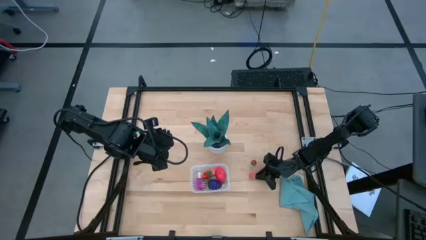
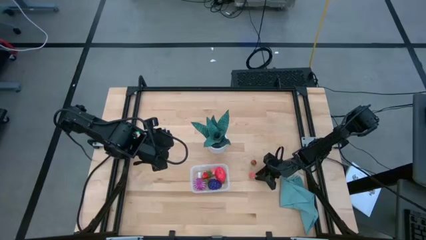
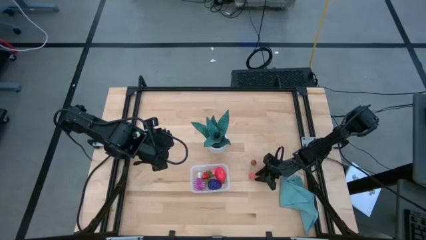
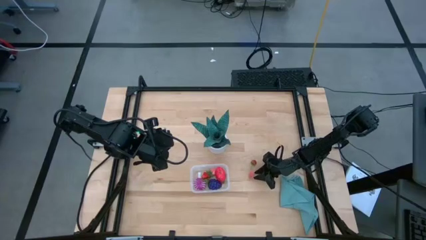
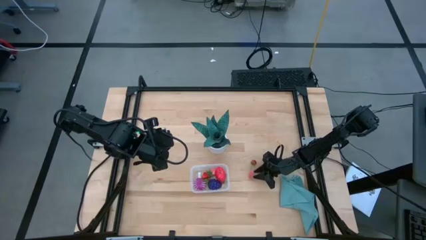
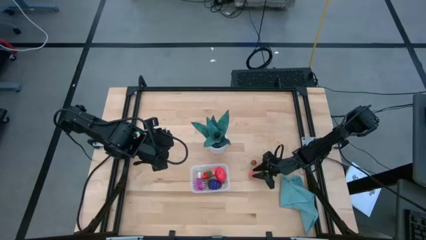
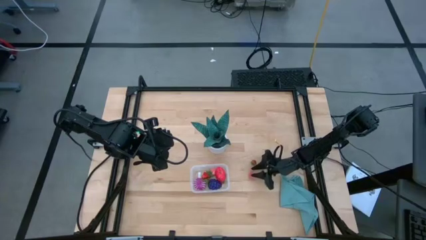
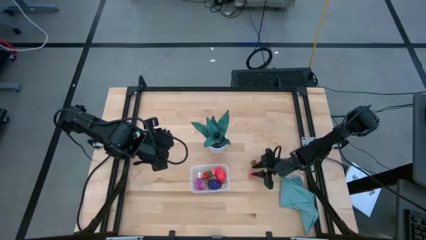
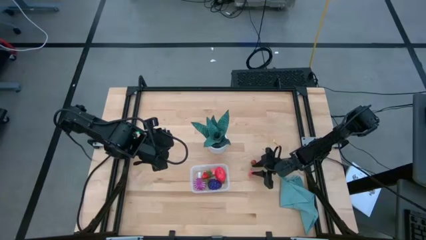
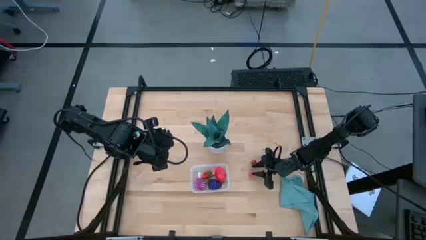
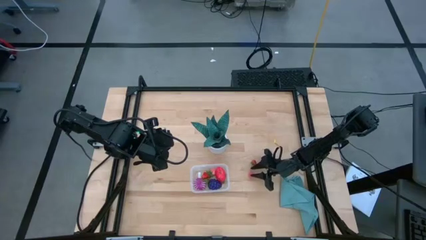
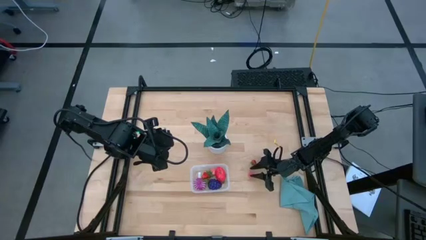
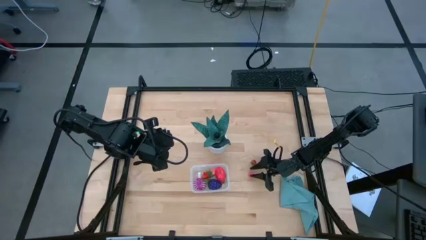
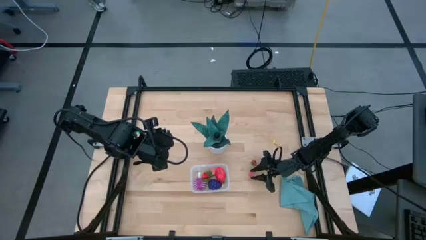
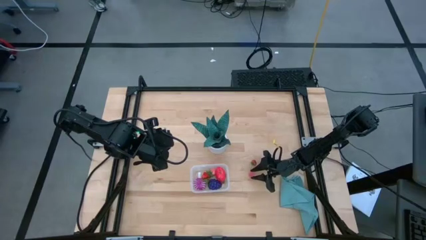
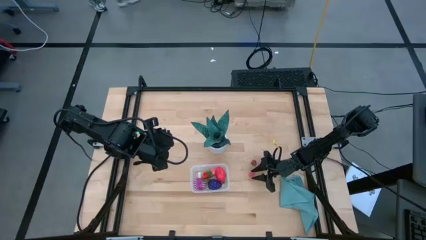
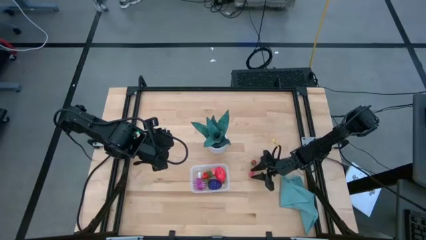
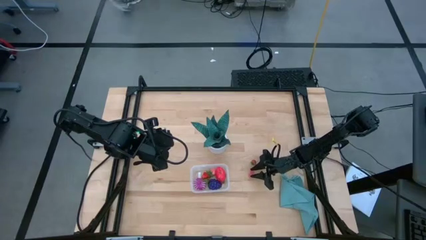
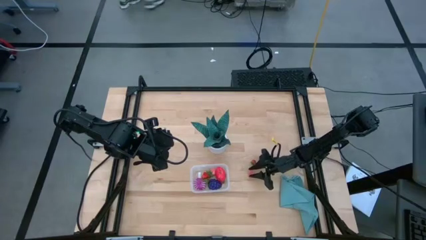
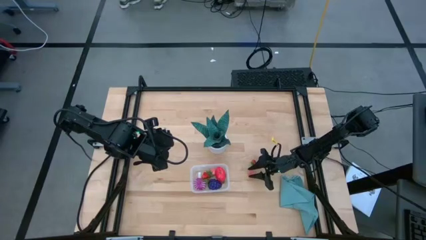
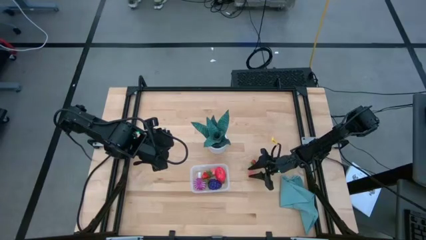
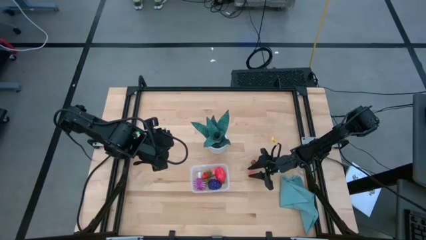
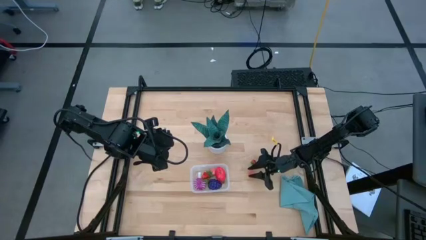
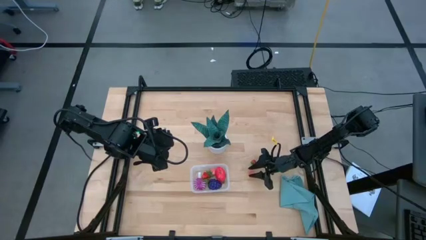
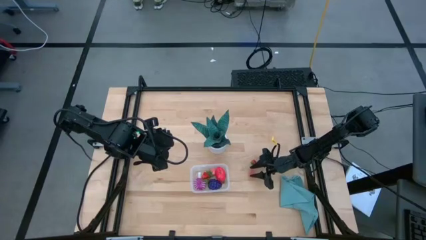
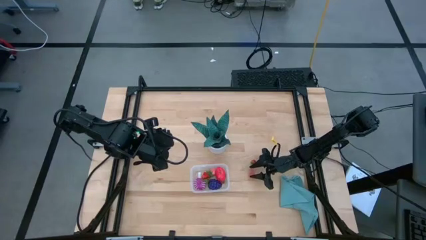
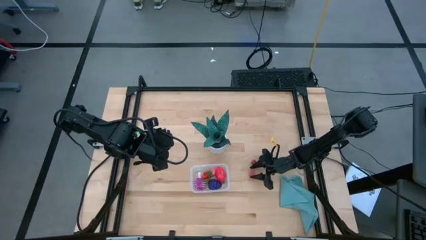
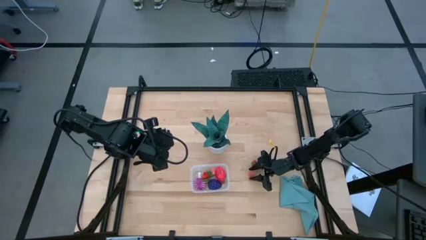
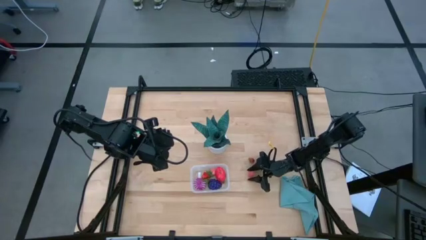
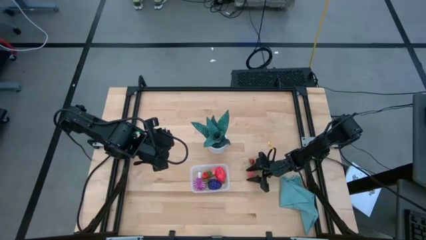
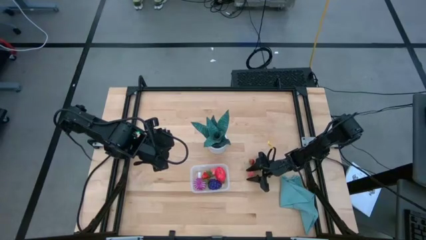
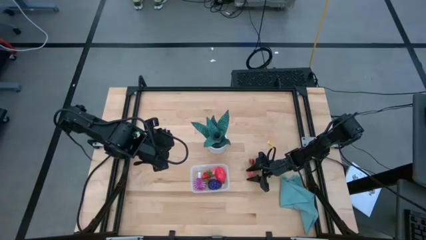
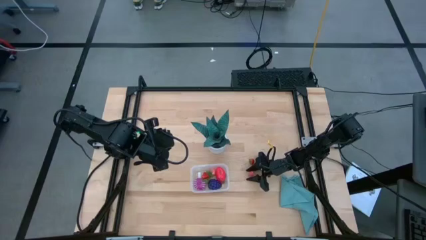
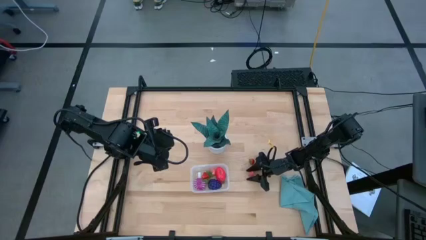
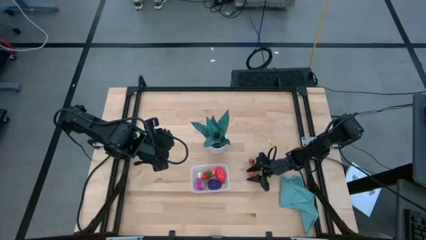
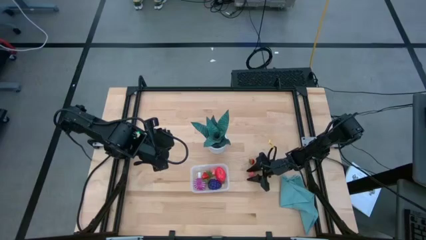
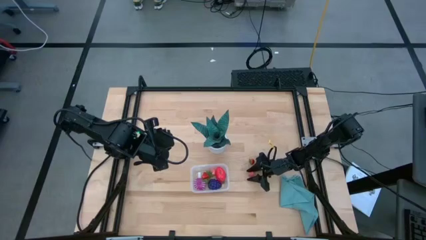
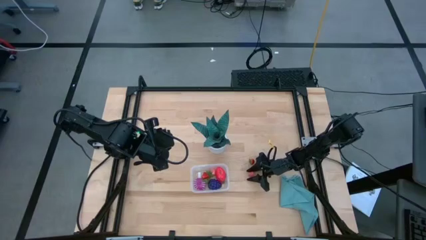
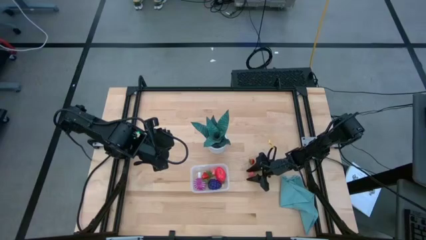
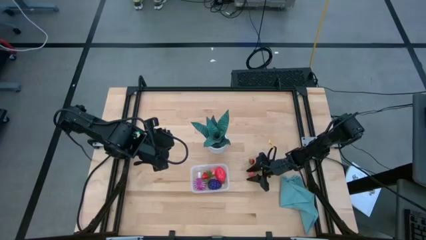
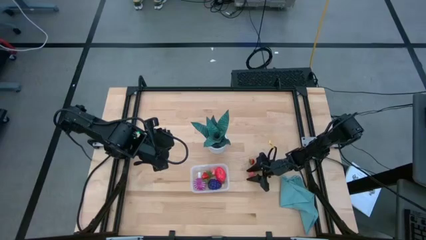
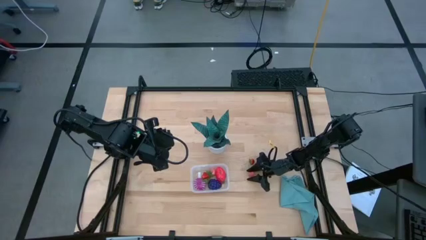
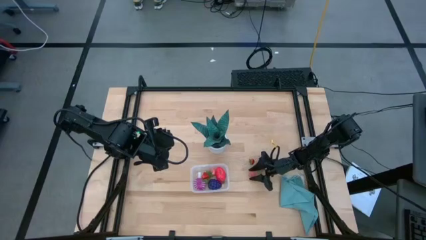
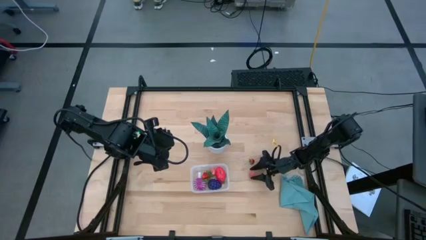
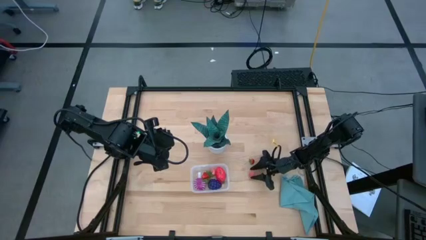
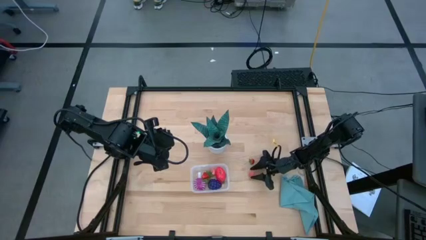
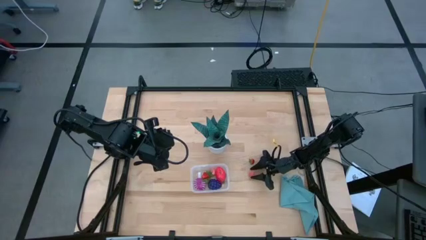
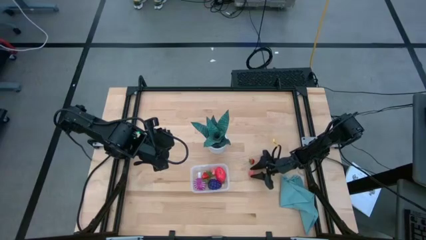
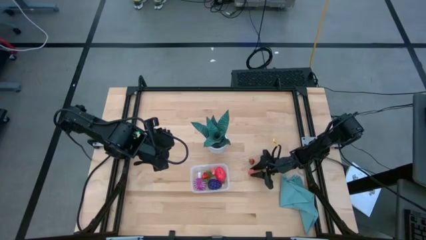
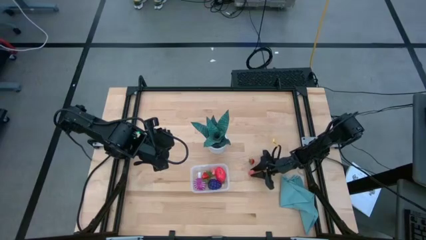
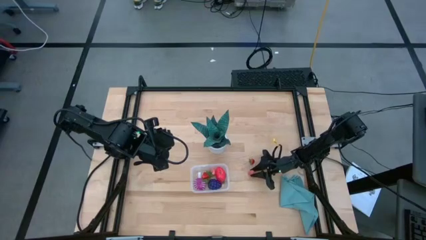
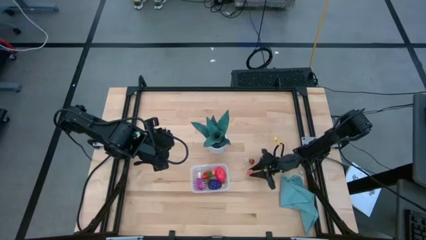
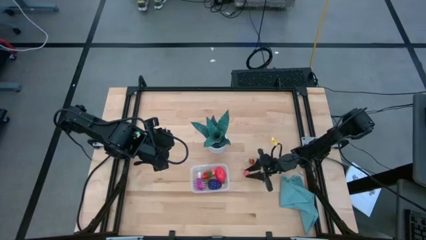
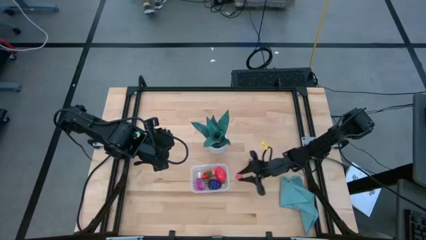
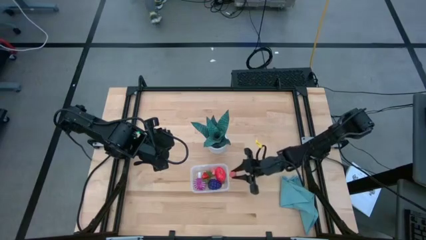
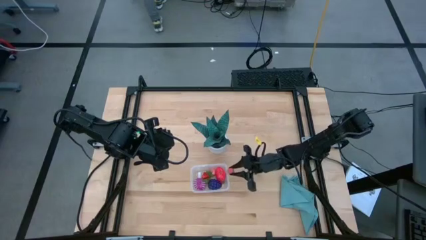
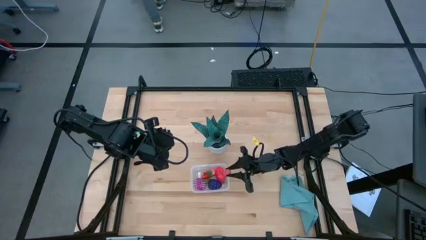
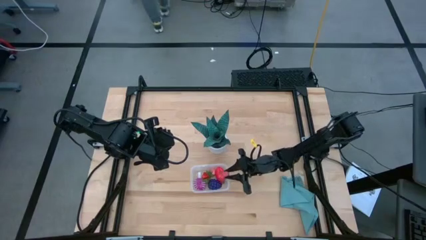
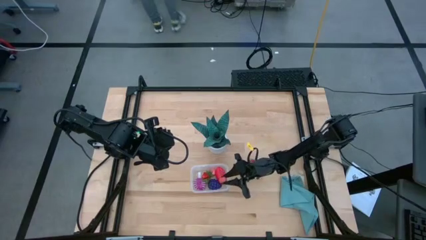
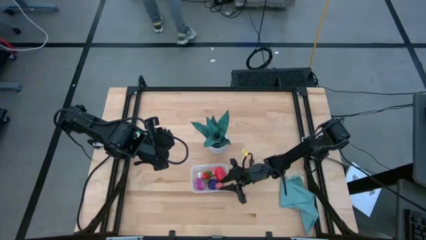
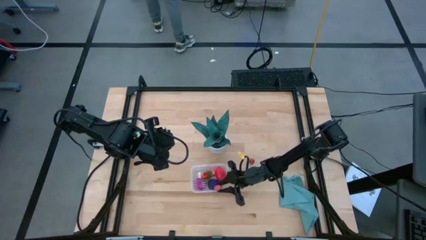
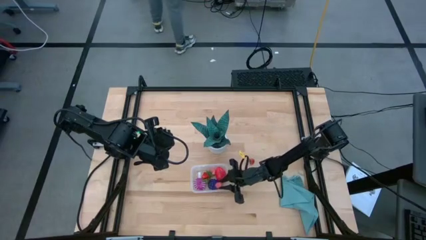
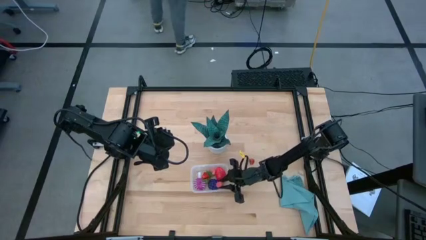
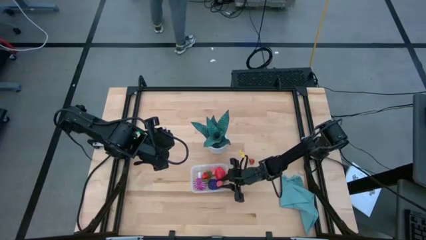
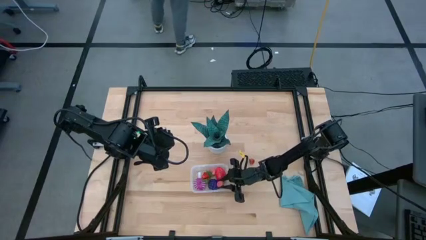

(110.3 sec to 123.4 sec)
Task: Pick and placing Produce into tupperware
Put the pink peach into the transparent bin

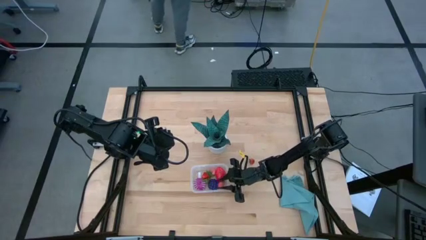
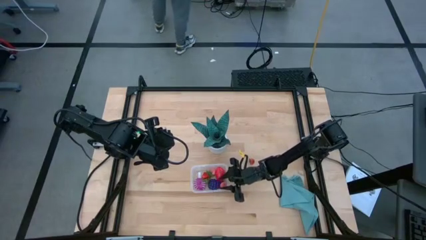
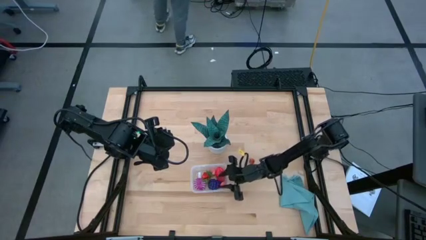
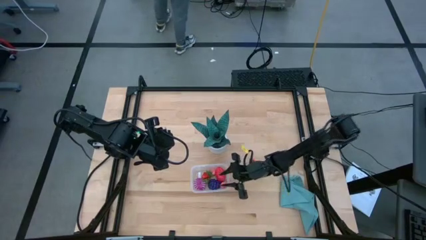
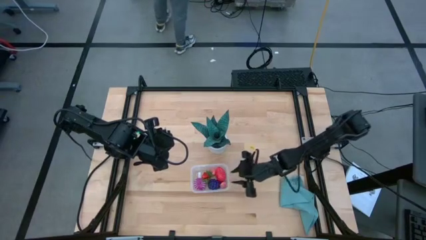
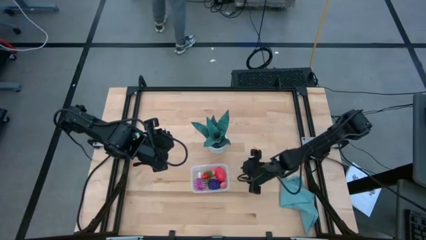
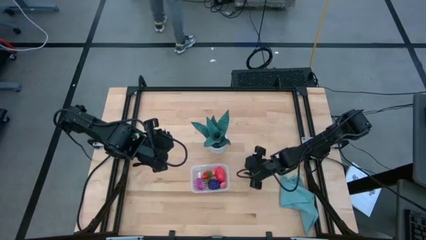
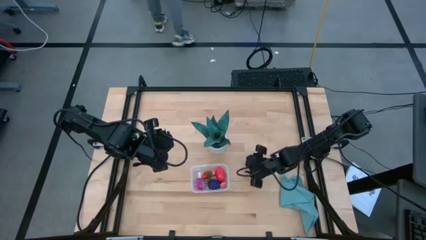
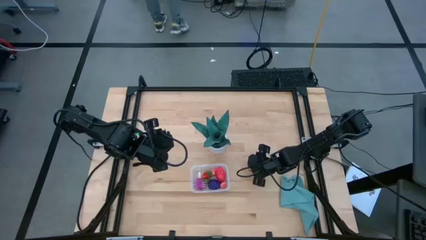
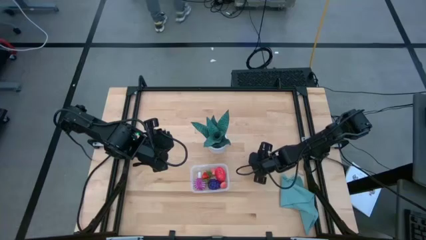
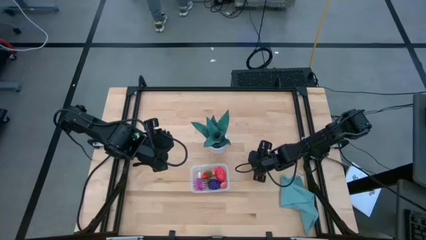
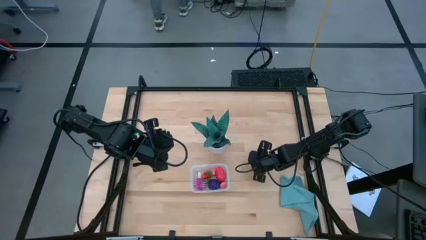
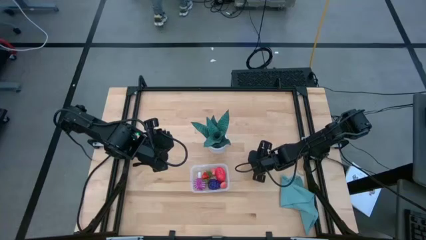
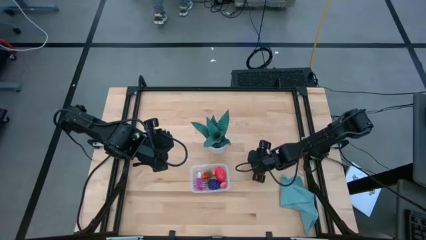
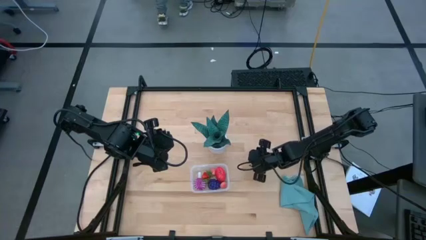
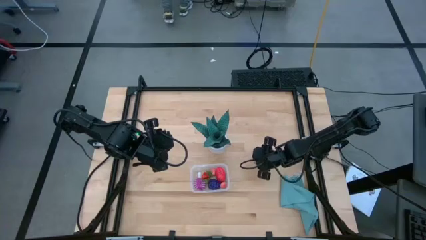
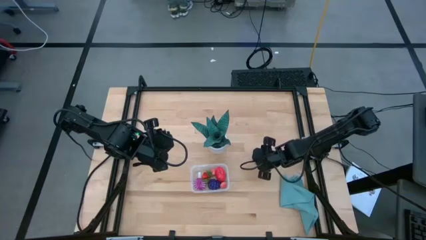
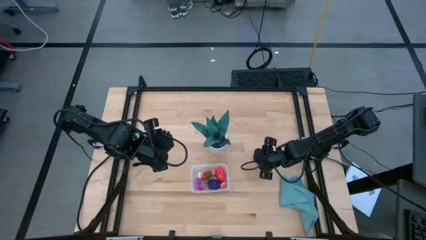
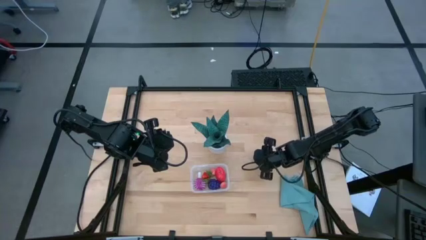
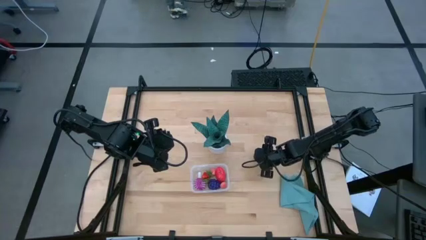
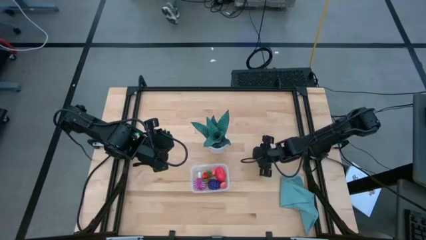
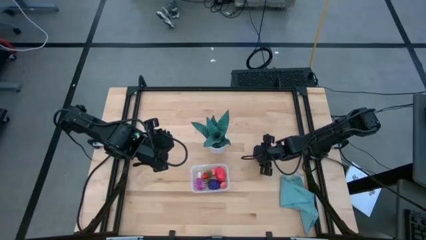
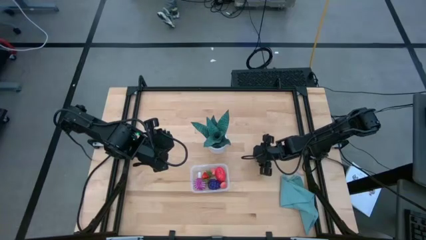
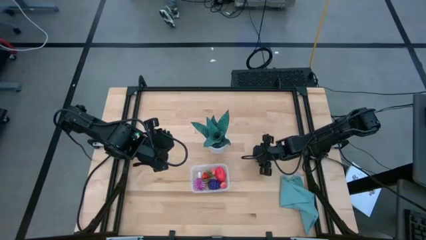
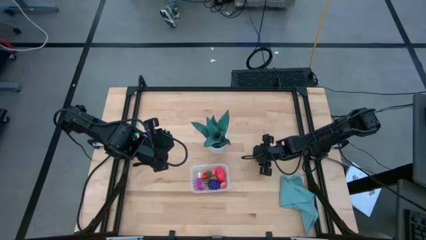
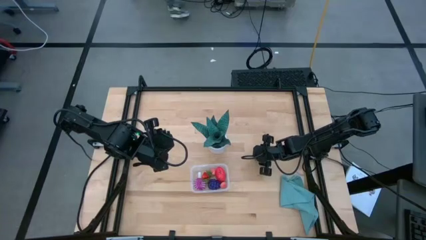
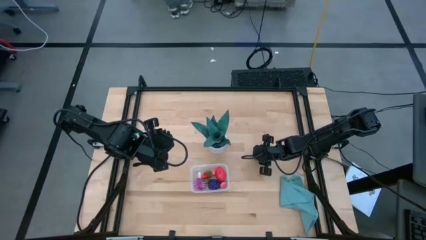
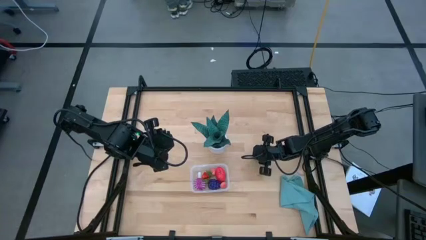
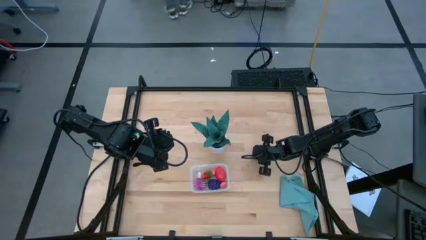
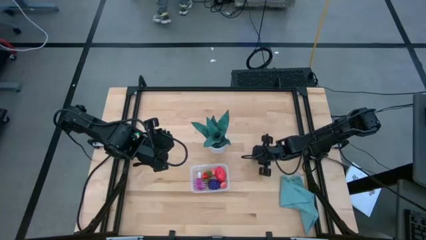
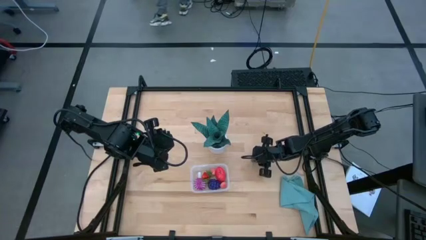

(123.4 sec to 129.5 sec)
Put the red strawberry into the transparent bin
